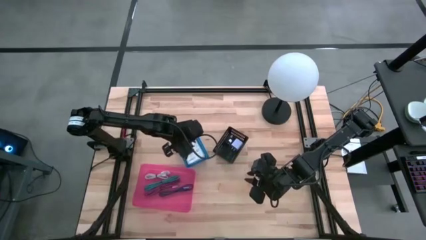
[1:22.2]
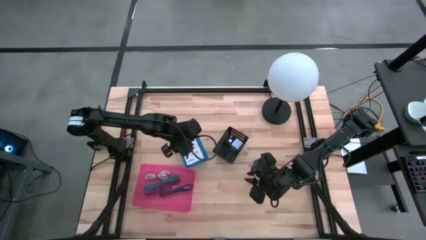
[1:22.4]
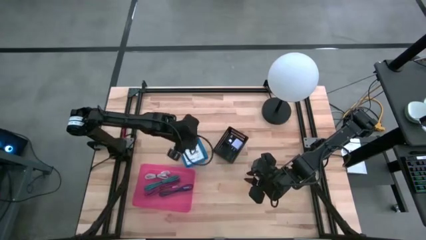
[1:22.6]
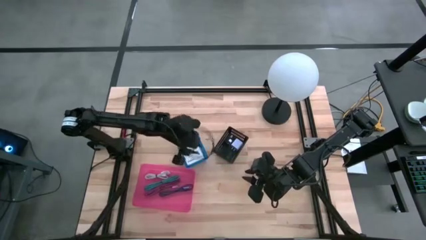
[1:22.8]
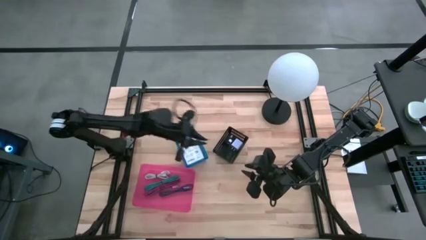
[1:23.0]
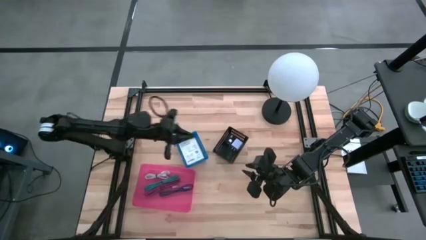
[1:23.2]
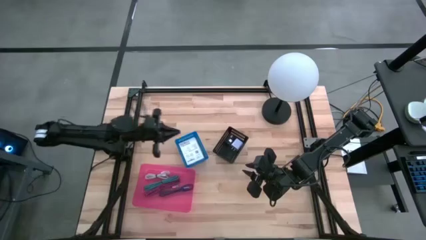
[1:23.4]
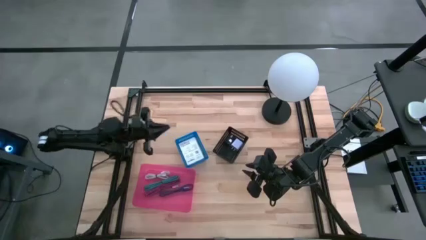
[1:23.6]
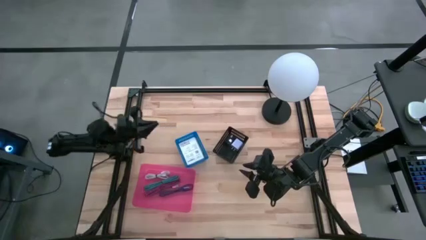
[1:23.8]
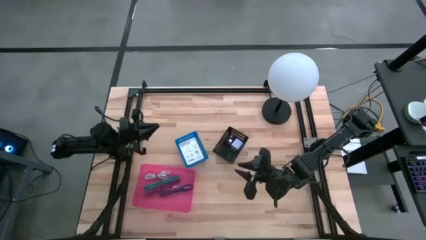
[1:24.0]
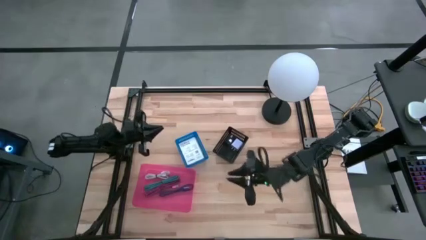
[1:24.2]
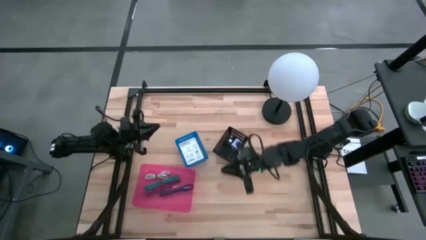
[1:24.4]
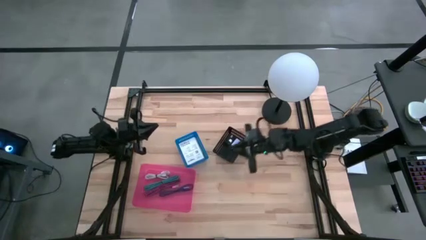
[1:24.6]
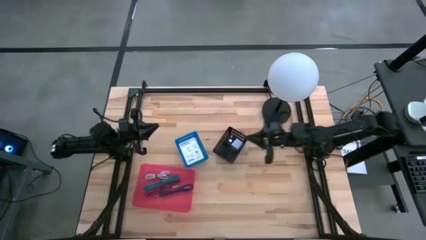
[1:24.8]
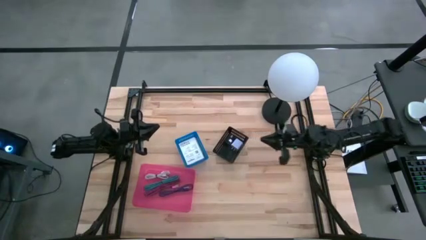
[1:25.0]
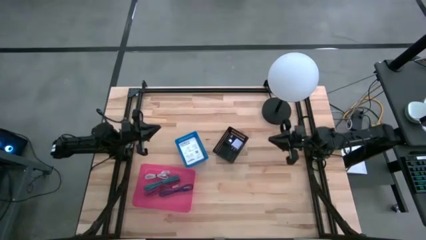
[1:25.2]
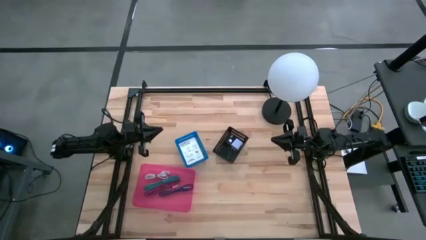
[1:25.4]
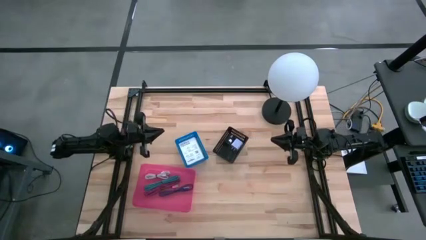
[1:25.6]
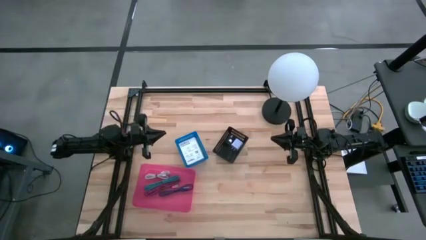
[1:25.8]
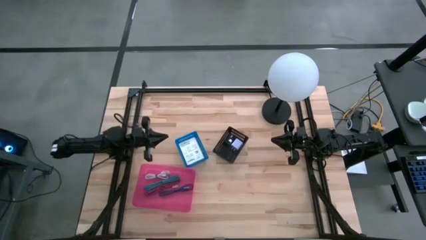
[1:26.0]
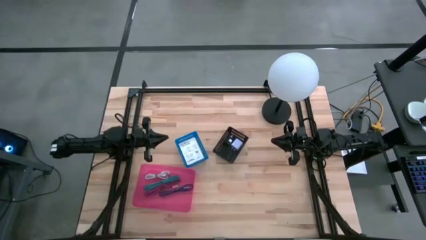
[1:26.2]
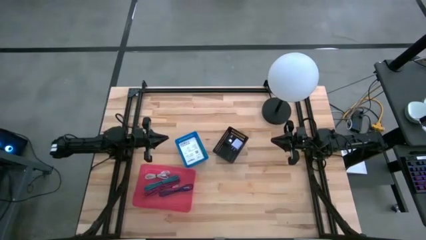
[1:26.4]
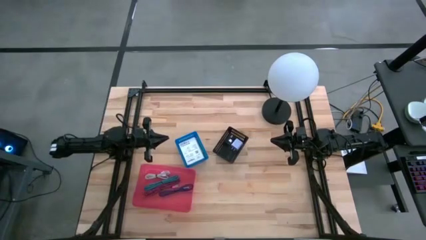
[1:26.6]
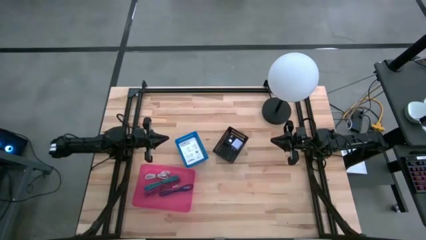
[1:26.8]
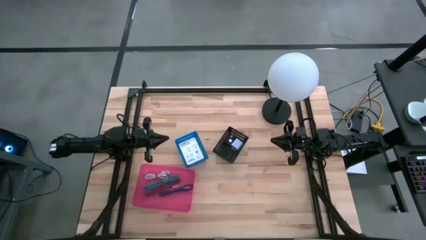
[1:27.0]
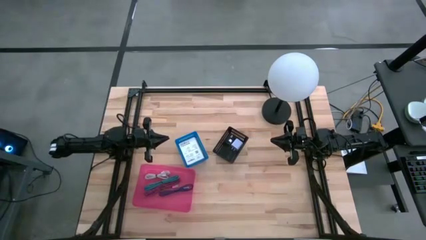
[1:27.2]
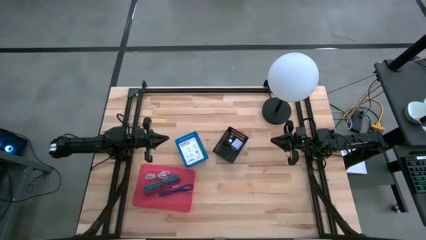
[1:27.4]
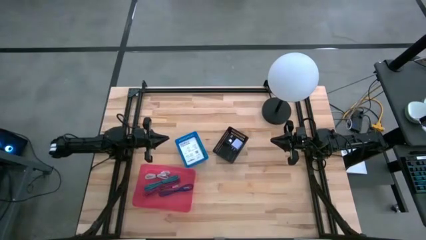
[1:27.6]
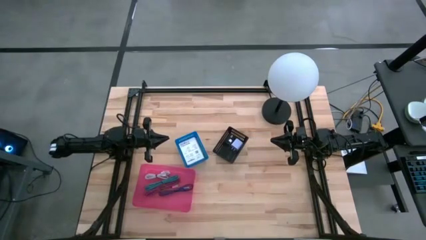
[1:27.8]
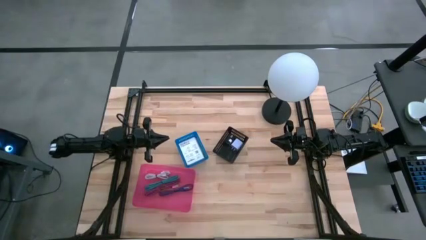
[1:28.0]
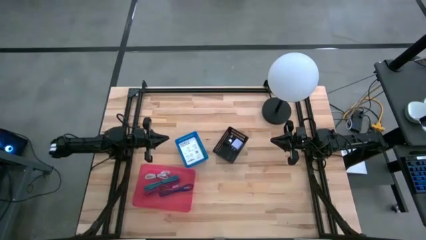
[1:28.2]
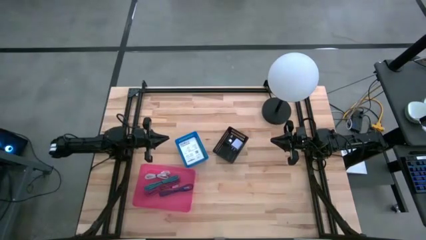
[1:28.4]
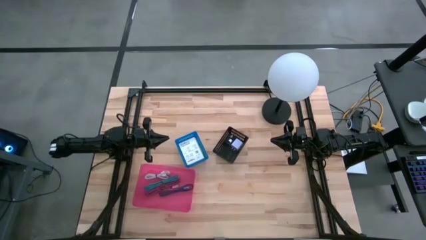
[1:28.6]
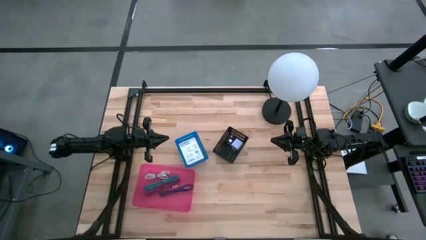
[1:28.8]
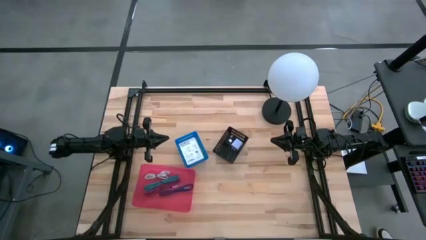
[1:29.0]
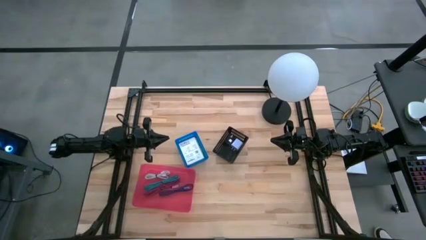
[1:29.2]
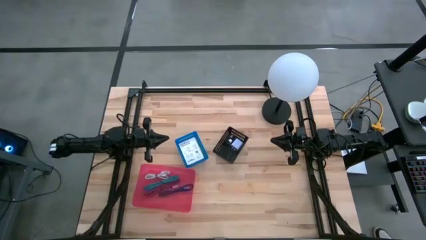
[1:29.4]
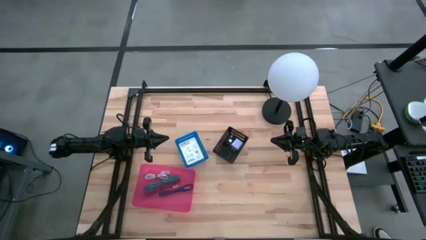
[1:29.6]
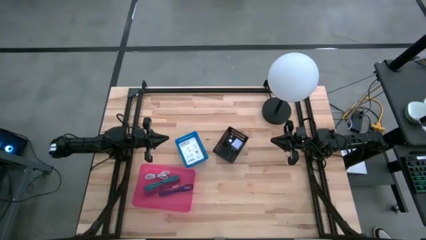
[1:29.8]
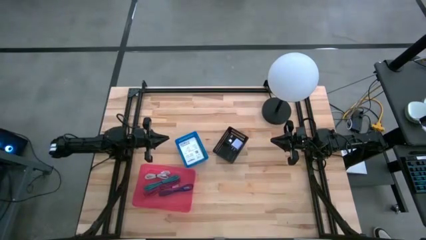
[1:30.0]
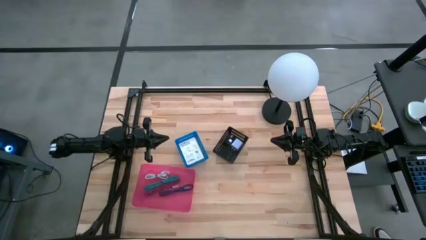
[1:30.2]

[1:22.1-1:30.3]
Task: Pick and place items into bin
Return to Home Position
